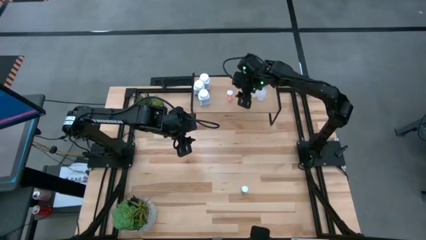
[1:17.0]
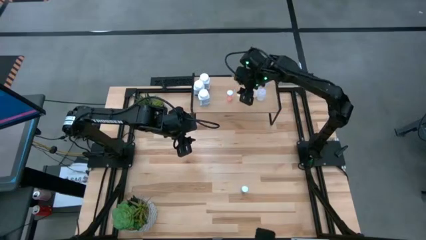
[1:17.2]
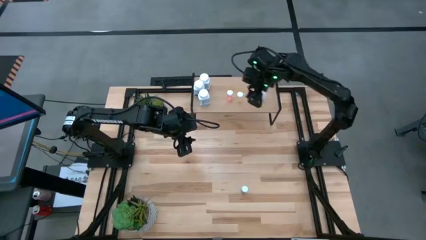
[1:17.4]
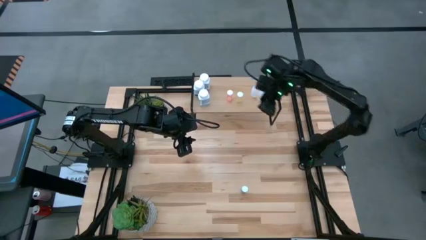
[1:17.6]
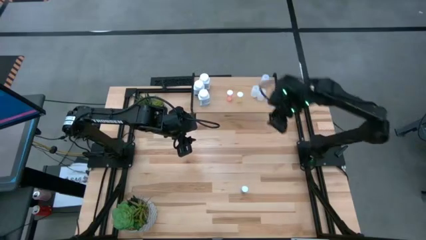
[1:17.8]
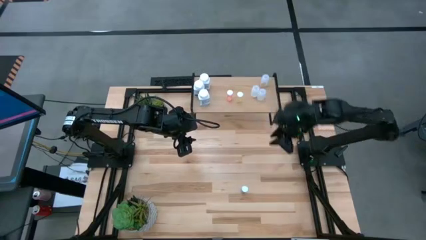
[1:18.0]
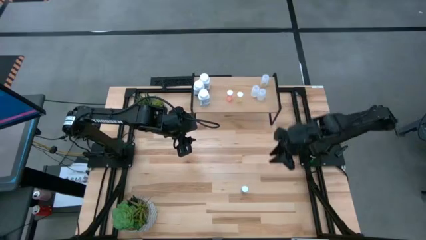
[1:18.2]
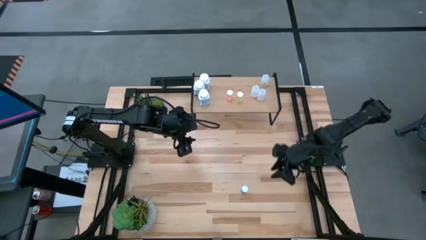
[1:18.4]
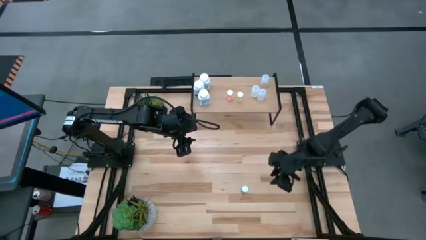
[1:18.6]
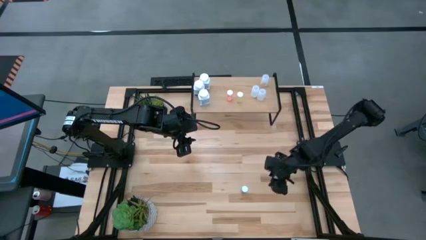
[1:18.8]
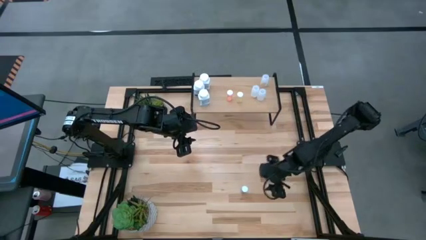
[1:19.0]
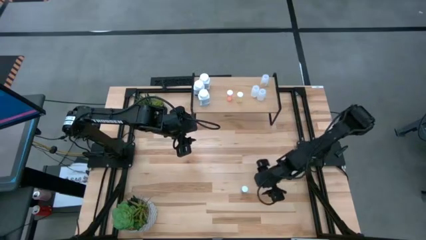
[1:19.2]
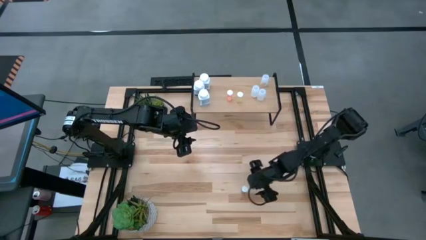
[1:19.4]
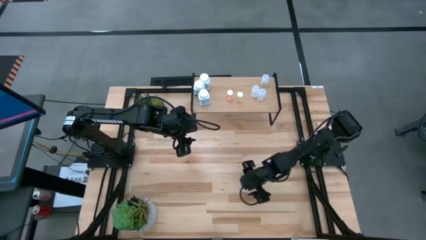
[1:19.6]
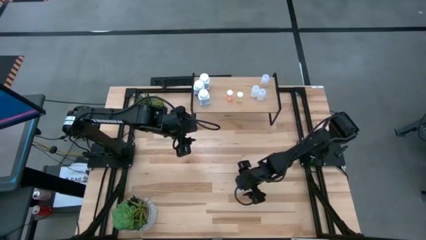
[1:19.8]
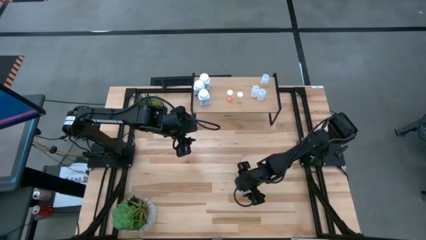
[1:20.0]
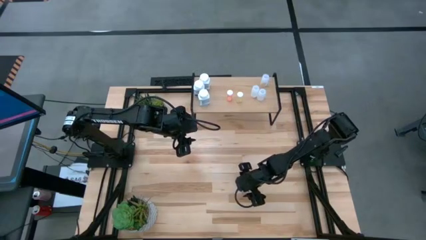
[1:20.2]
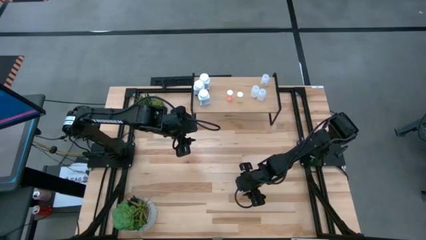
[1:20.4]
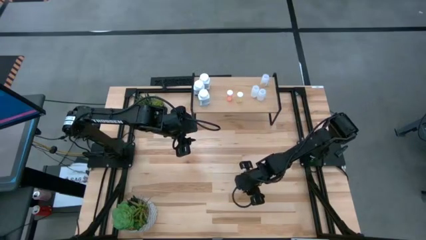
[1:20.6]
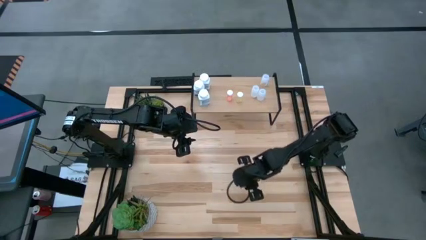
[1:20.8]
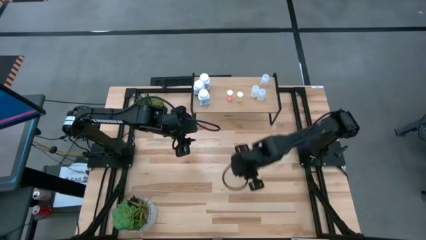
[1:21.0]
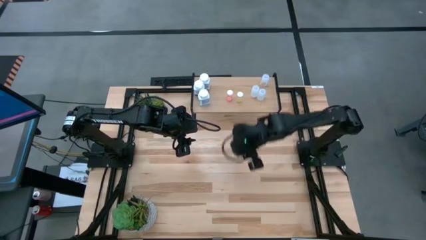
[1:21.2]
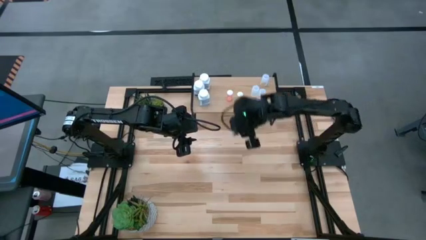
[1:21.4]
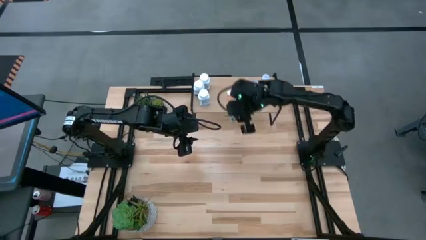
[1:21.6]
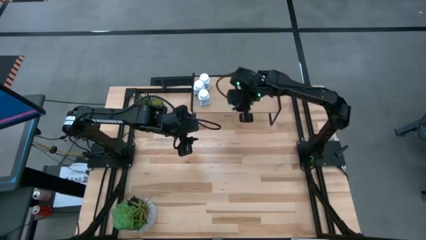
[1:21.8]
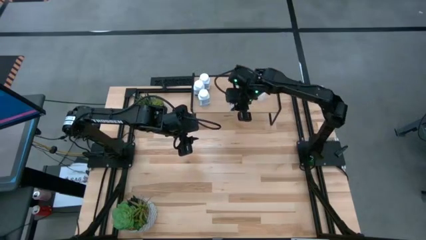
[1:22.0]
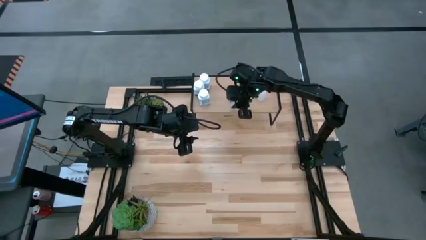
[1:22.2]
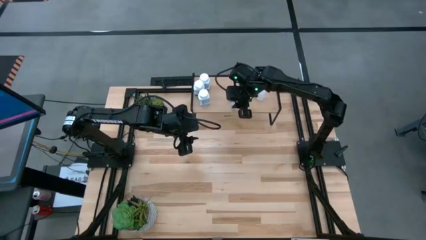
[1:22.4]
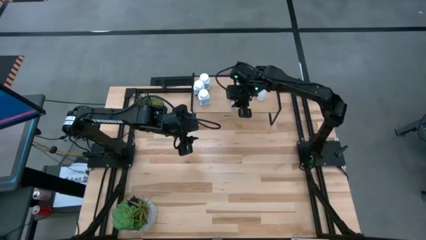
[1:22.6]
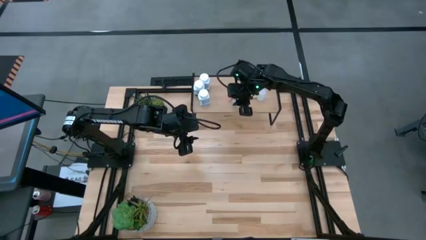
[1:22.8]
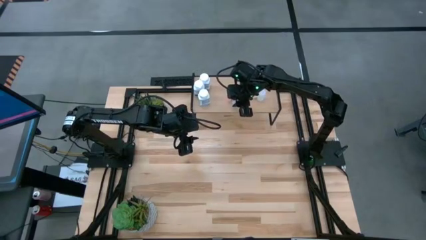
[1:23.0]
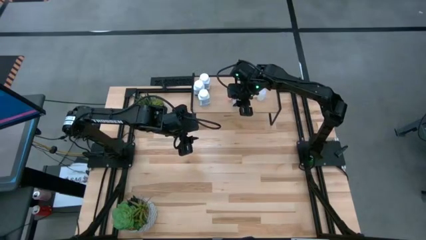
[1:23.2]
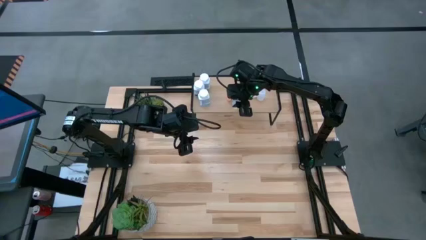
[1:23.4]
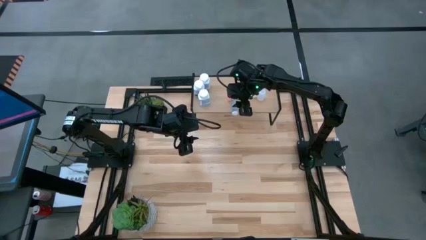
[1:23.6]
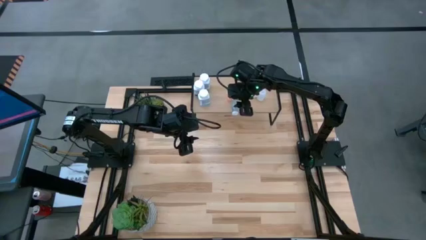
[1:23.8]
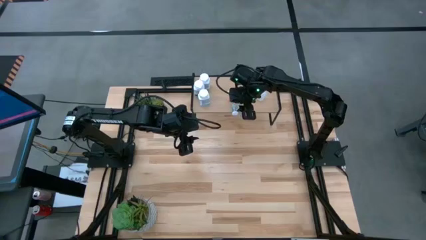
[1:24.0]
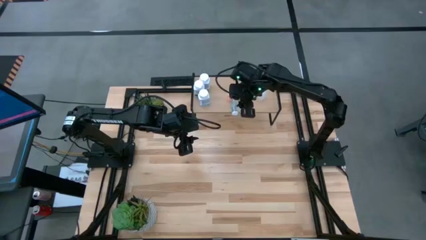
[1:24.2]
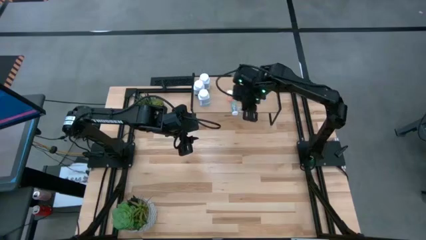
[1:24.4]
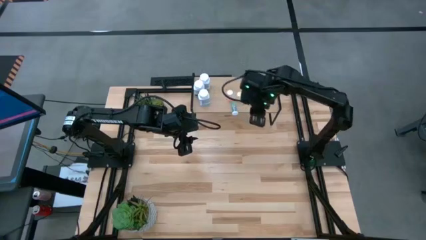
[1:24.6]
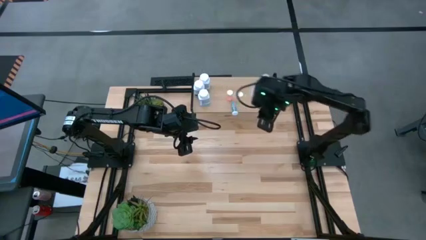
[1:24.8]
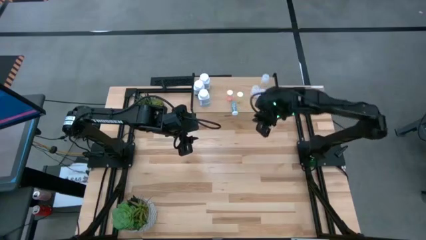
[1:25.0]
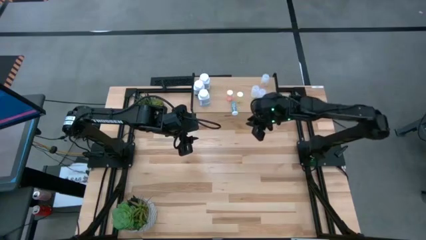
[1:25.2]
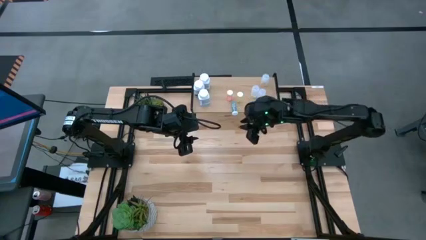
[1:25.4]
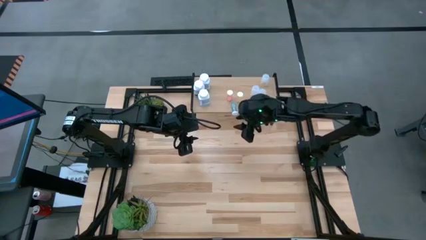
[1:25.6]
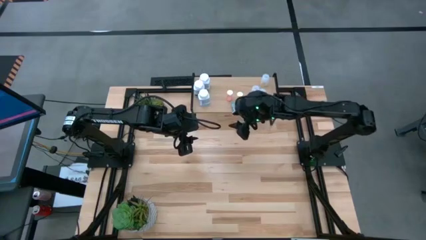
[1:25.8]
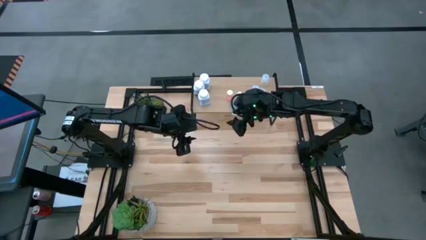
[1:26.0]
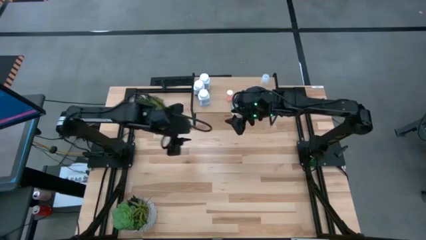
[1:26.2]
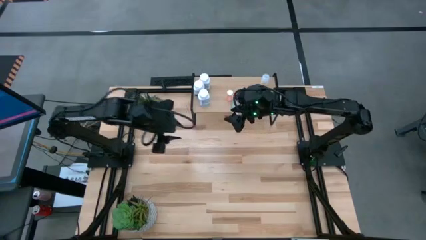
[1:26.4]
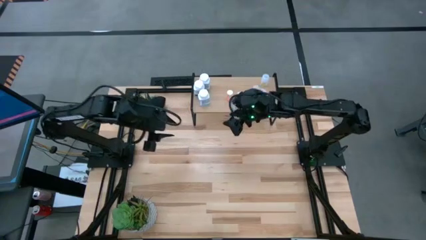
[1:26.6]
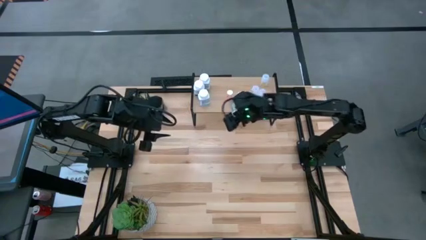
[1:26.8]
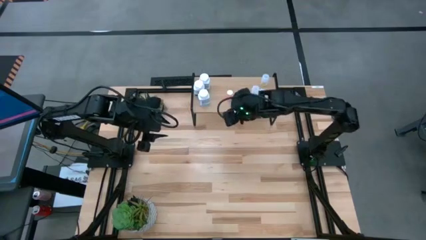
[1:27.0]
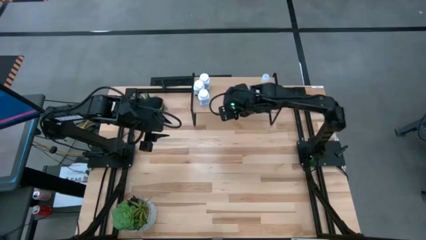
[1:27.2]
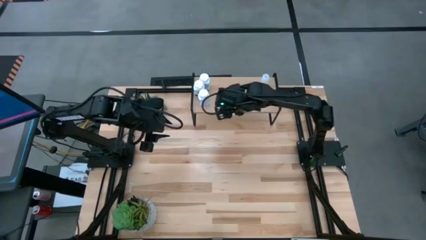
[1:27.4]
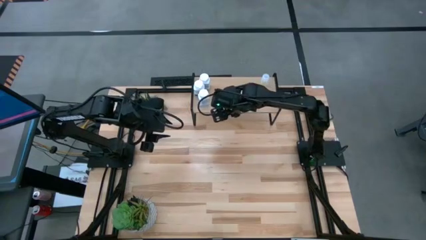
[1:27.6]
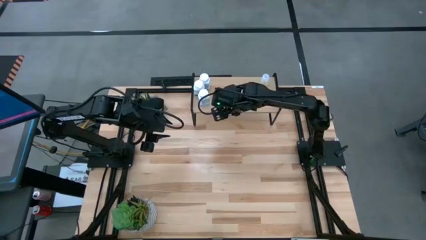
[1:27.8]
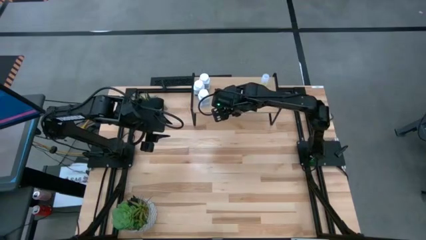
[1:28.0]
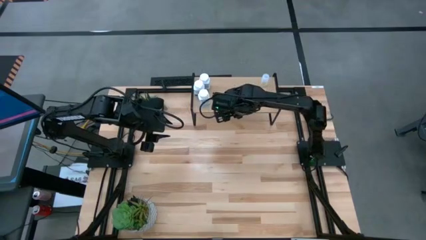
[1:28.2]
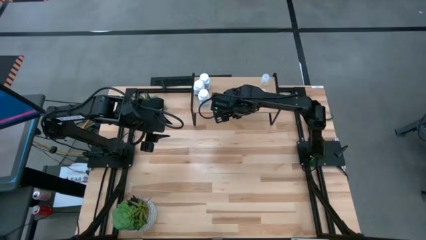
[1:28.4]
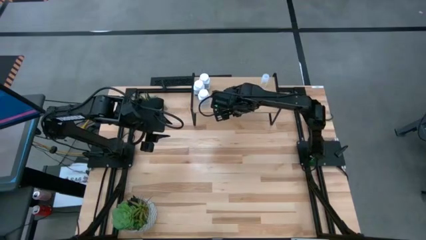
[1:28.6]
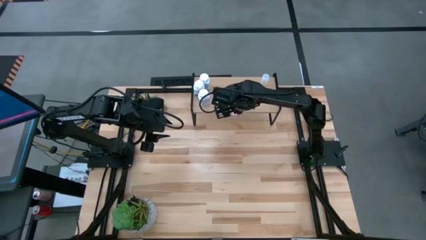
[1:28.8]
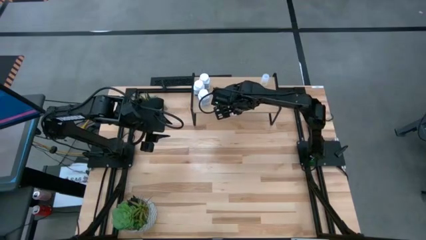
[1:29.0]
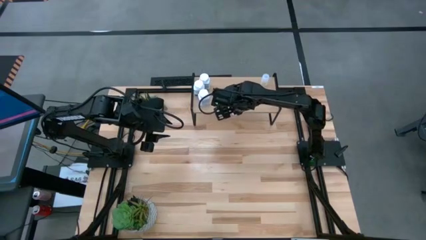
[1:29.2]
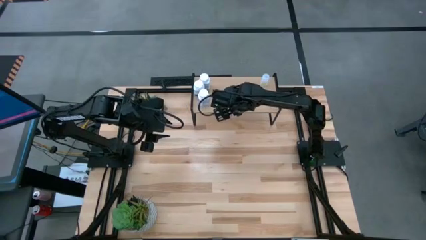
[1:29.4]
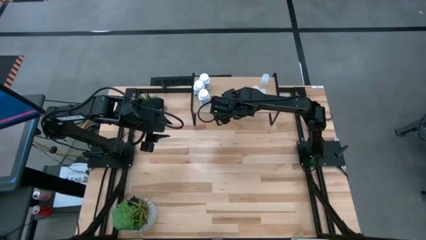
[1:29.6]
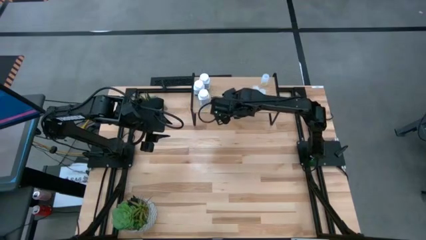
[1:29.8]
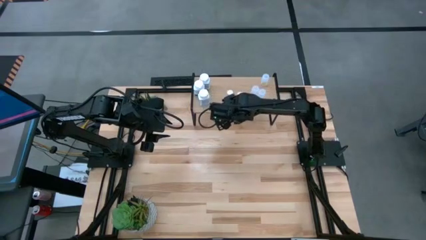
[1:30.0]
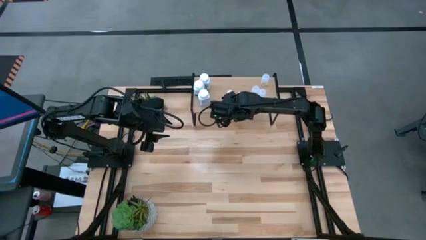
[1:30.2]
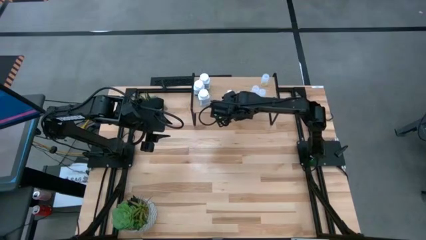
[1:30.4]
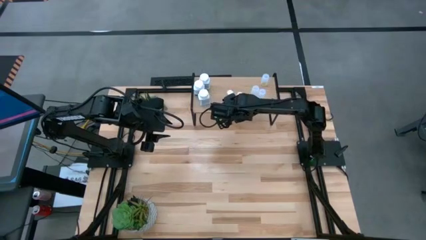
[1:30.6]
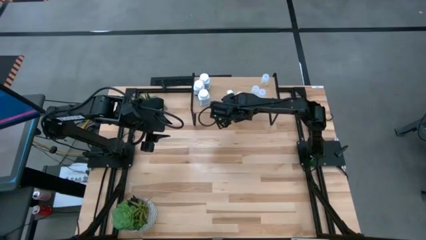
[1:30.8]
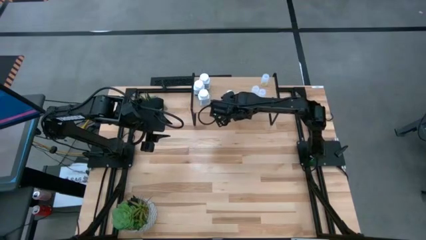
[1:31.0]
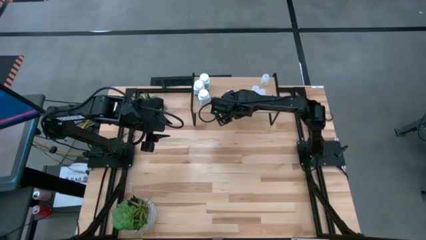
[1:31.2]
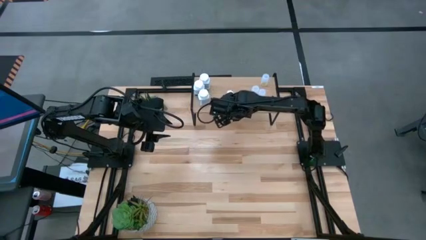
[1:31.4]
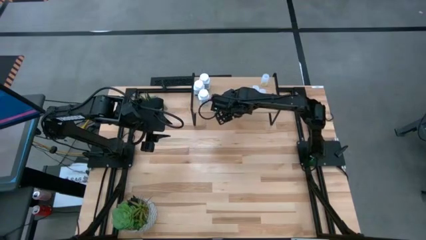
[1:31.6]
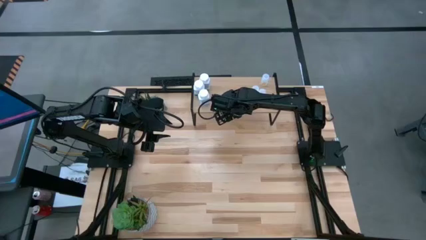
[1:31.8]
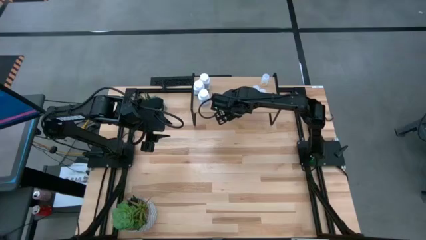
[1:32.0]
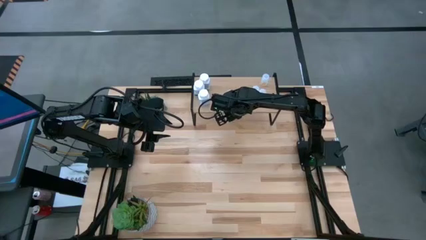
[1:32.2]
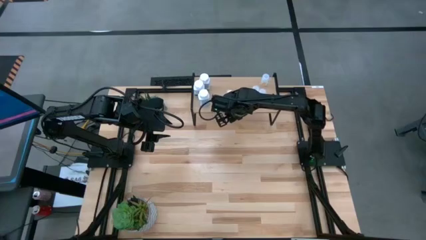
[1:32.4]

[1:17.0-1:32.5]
Task: Pick and place medicine bottles onto shelf by color
Put the blue pill bottle on the shelf
